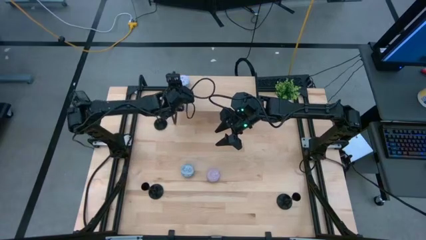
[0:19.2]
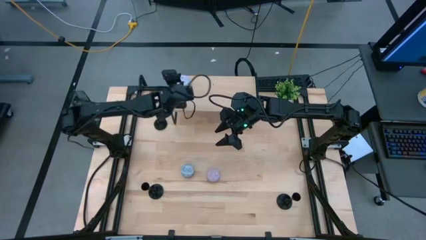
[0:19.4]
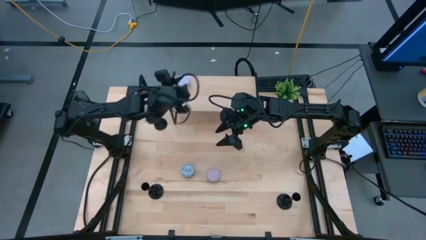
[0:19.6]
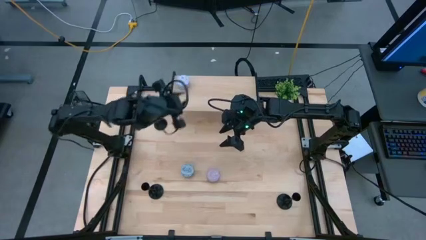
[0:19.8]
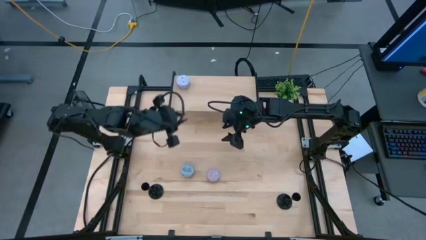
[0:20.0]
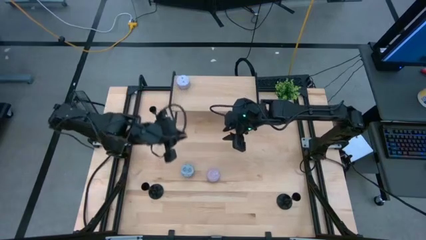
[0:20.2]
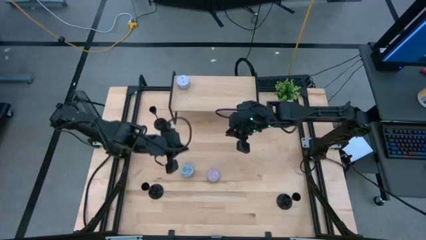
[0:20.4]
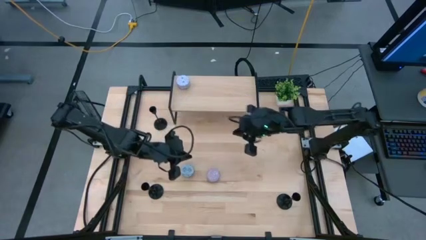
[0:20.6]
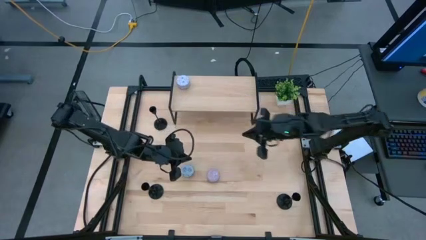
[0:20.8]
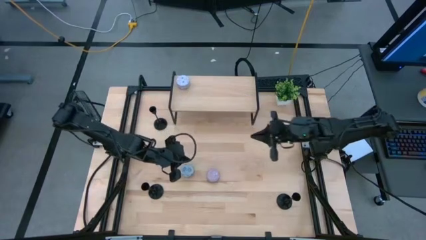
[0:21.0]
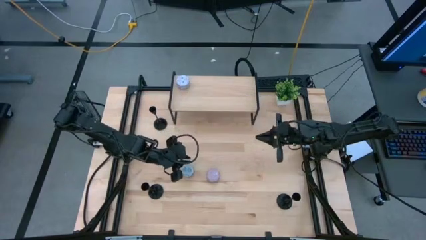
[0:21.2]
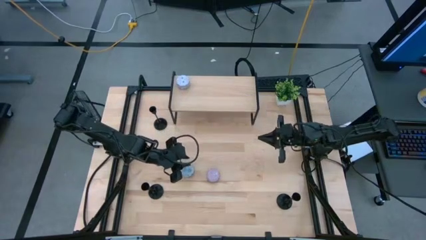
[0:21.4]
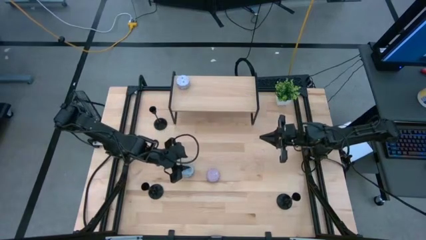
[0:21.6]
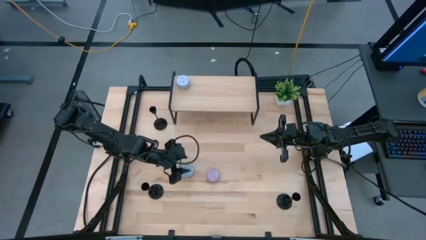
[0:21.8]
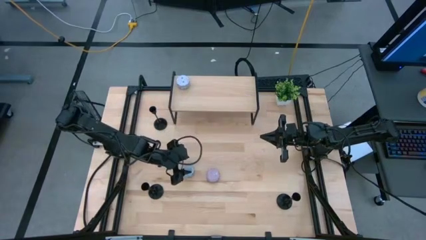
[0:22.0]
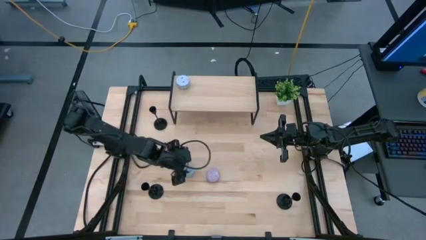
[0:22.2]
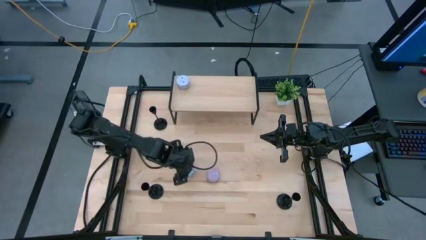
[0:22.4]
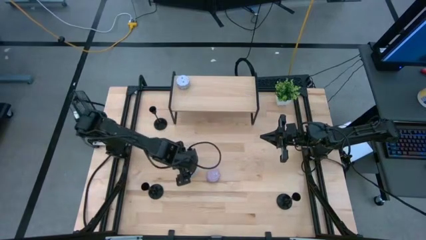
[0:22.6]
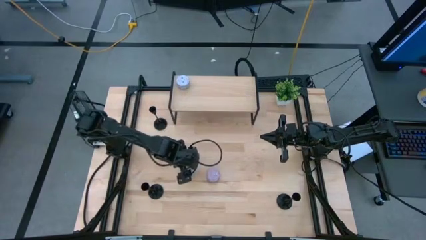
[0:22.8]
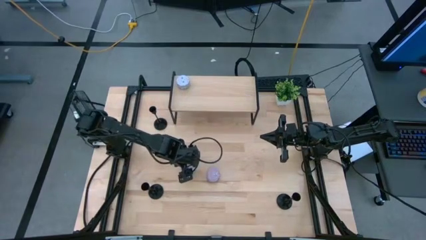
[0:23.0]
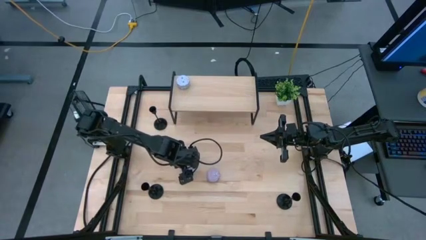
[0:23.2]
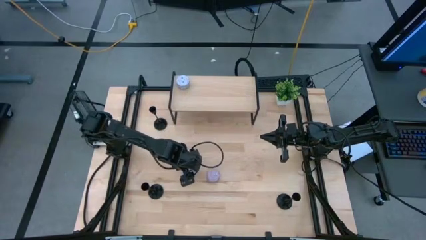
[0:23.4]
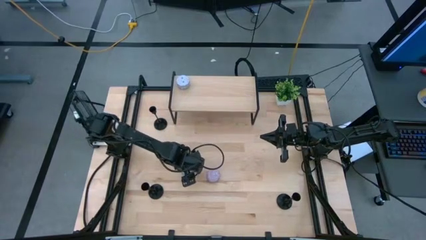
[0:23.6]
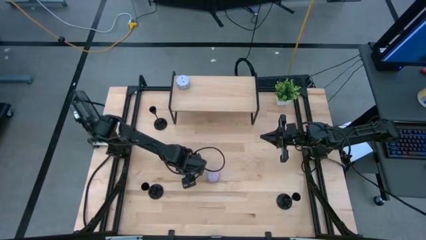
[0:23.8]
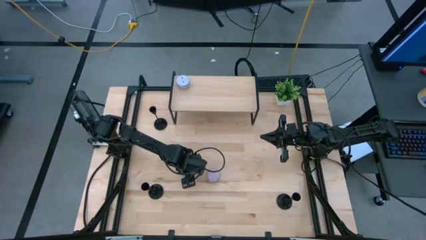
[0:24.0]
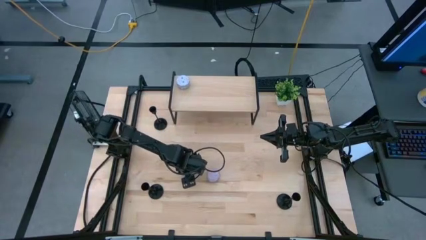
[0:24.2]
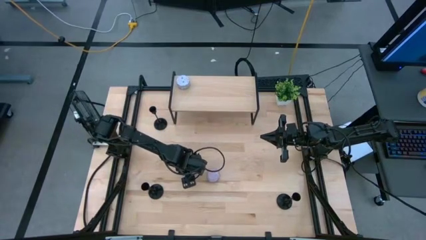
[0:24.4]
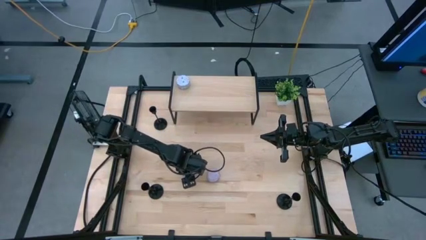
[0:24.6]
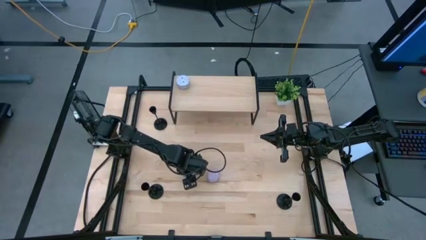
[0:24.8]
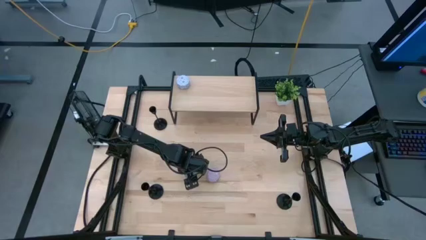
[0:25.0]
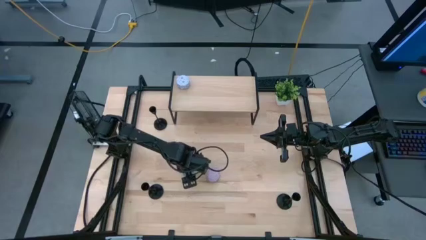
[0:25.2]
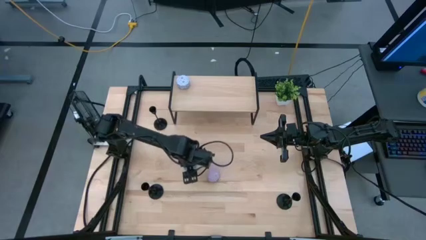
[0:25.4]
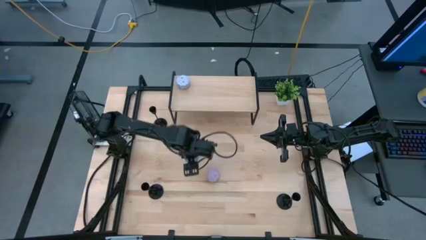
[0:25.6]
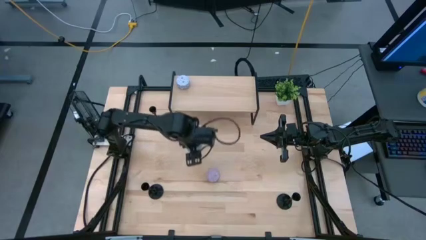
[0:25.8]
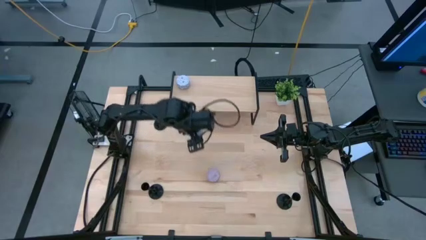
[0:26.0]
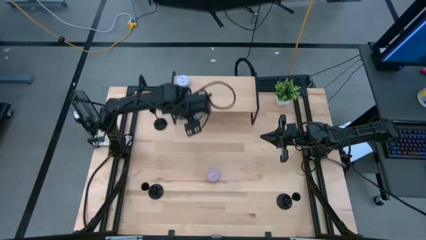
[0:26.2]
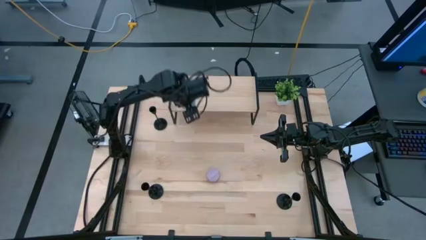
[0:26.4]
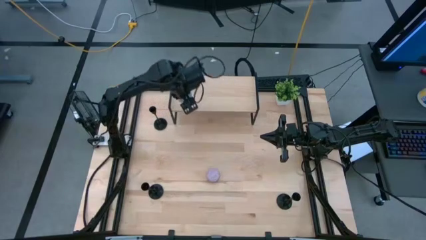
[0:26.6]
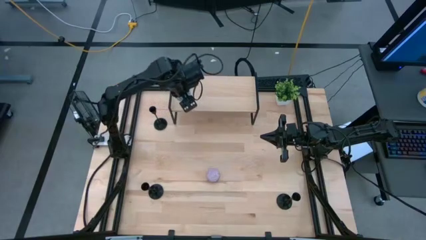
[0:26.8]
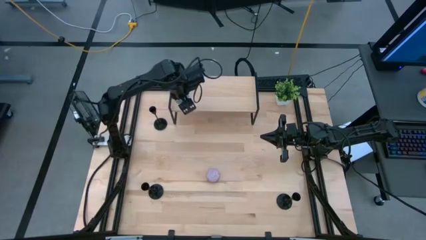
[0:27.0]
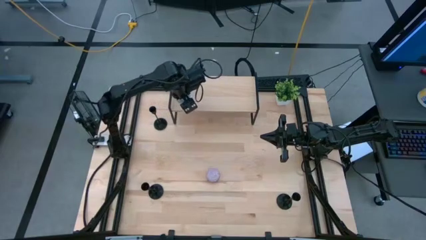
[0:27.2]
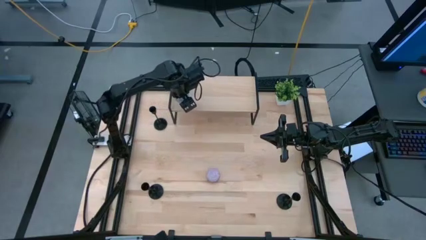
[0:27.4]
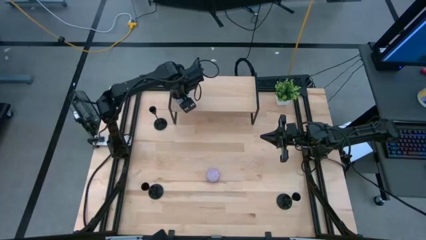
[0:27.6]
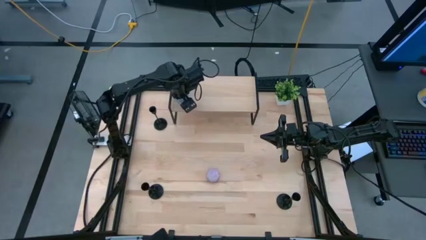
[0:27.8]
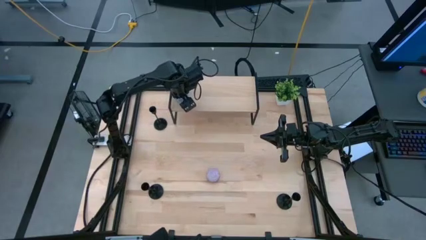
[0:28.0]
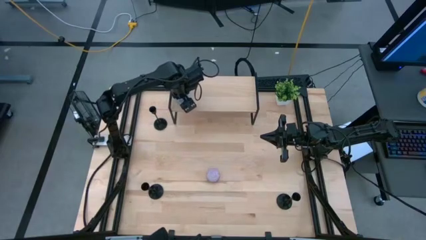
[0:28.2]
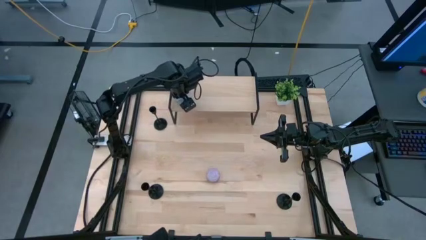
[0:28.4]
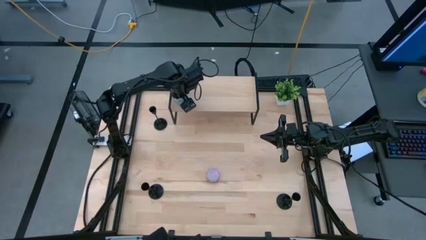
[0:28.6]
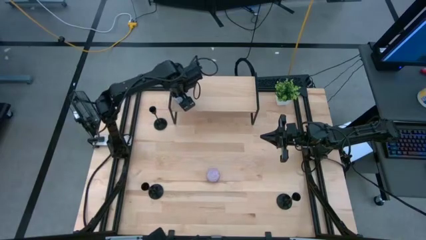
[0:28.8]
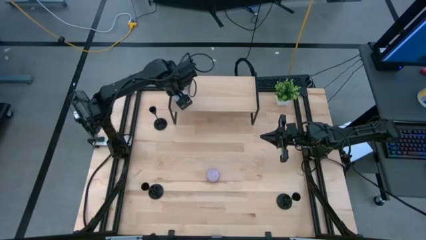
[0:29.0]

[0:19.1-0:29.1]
Task: Pick & Place candle stick holders
Put the blue scented candle on the shelf

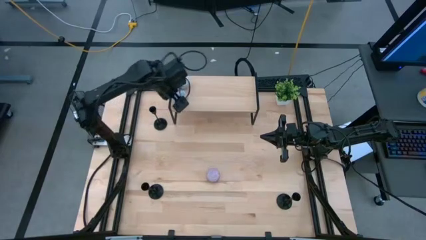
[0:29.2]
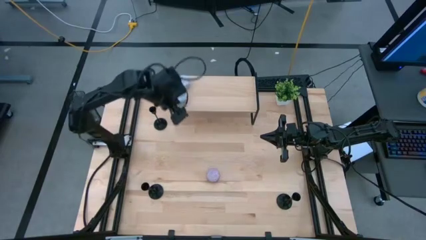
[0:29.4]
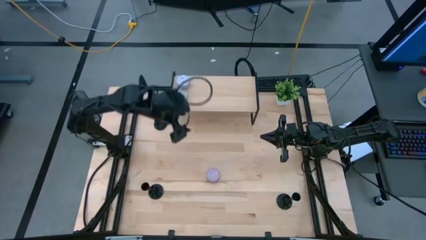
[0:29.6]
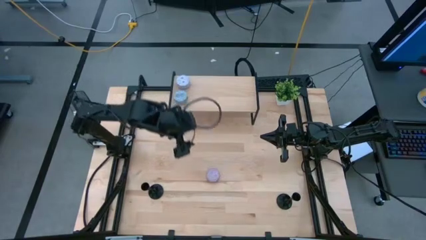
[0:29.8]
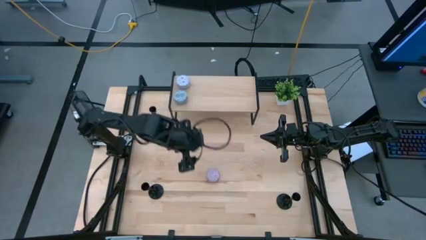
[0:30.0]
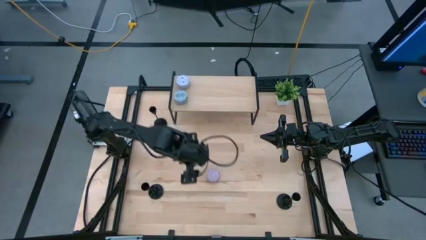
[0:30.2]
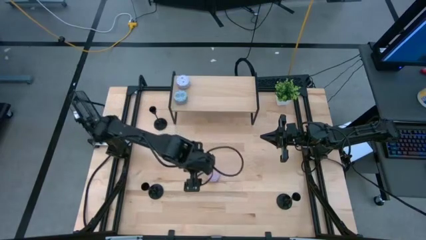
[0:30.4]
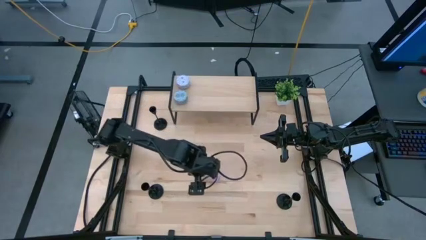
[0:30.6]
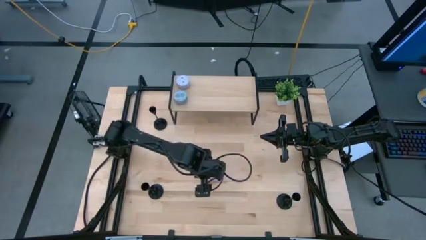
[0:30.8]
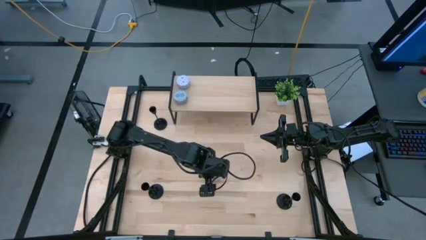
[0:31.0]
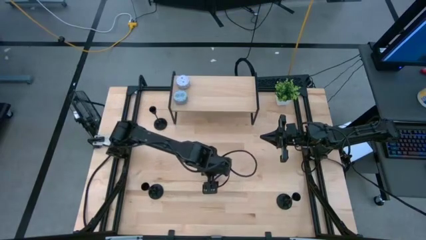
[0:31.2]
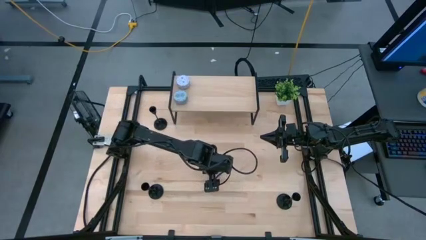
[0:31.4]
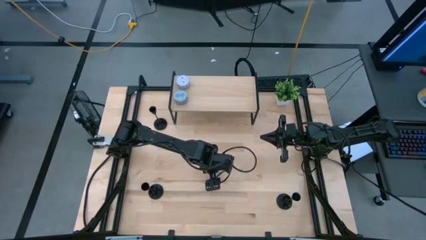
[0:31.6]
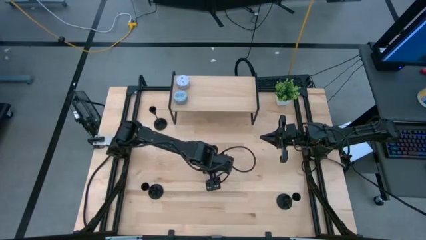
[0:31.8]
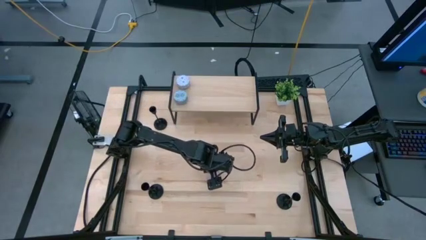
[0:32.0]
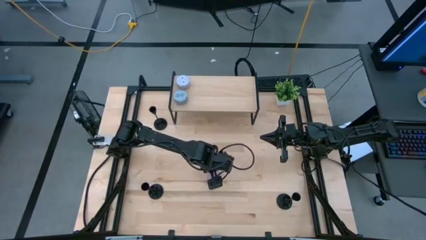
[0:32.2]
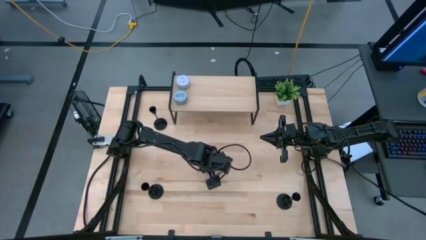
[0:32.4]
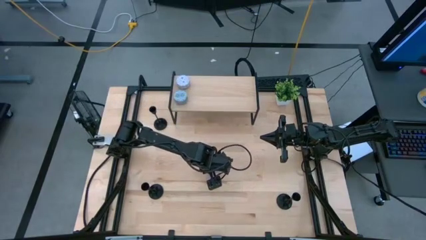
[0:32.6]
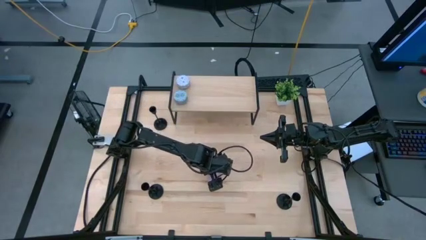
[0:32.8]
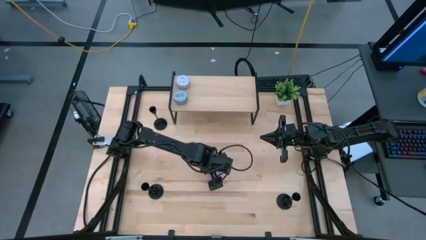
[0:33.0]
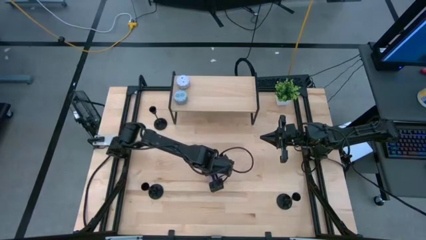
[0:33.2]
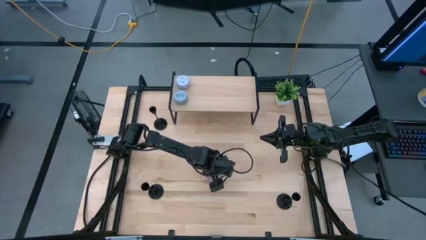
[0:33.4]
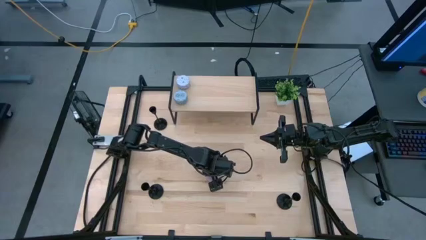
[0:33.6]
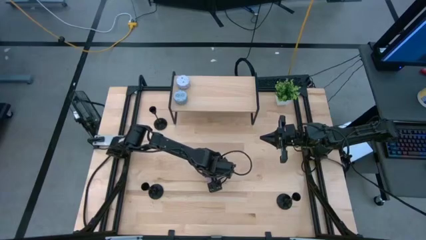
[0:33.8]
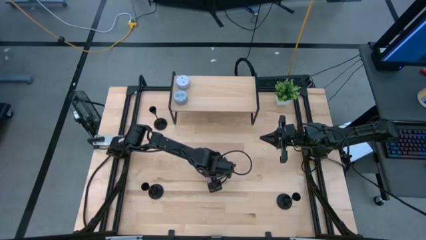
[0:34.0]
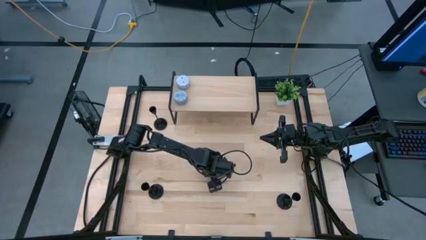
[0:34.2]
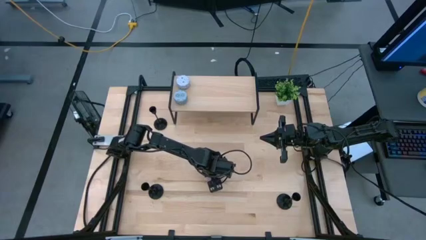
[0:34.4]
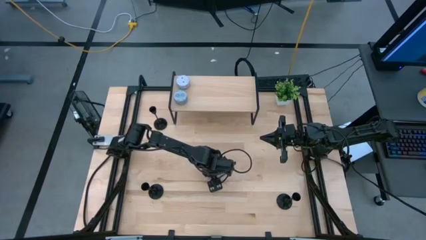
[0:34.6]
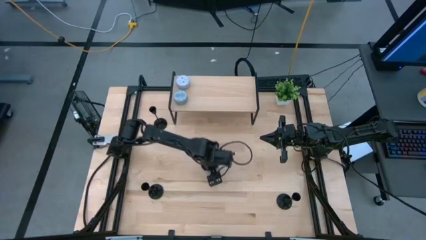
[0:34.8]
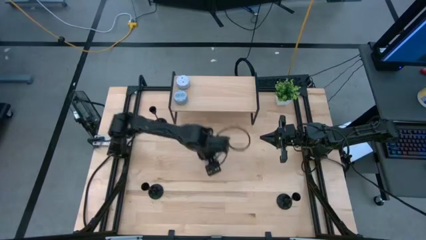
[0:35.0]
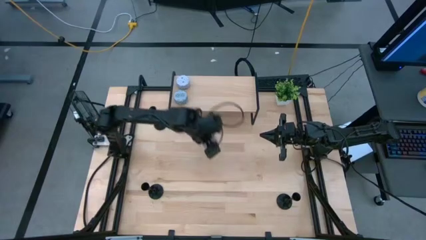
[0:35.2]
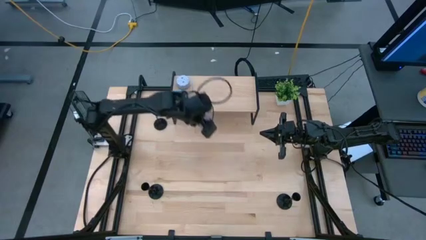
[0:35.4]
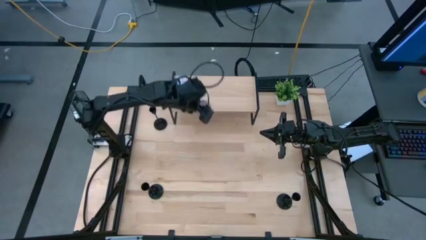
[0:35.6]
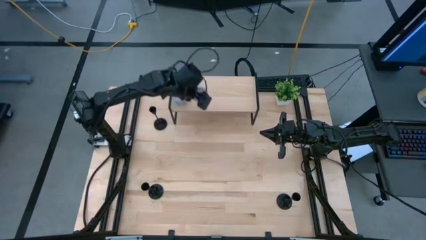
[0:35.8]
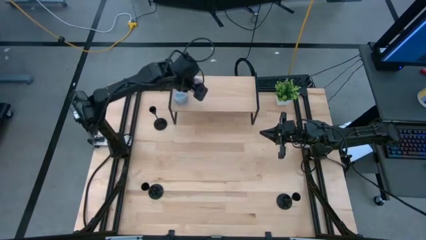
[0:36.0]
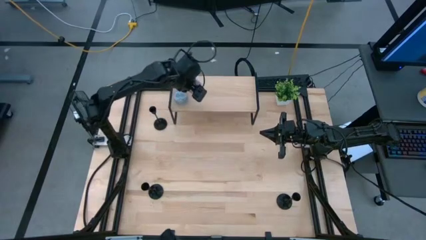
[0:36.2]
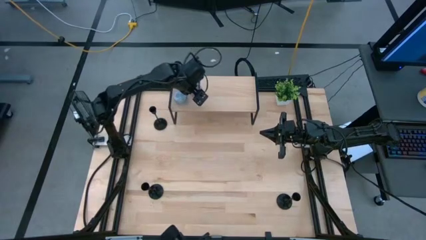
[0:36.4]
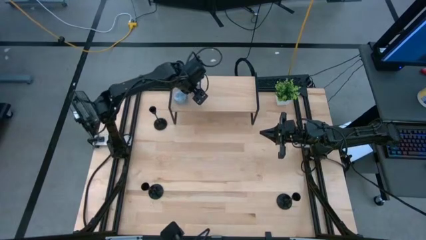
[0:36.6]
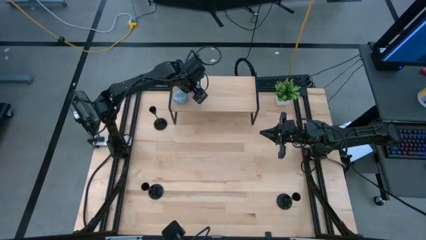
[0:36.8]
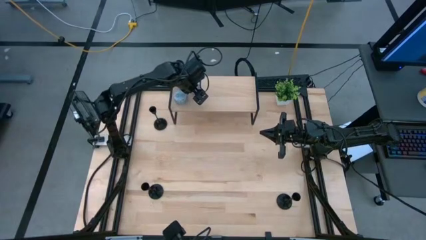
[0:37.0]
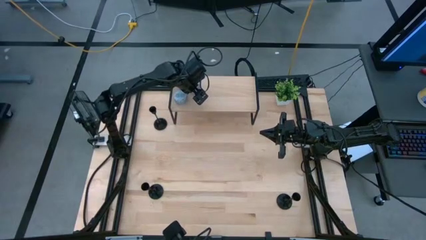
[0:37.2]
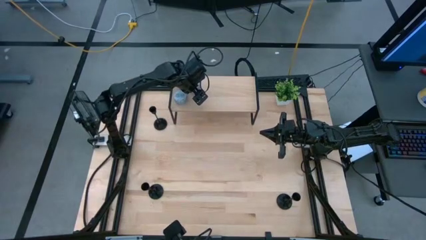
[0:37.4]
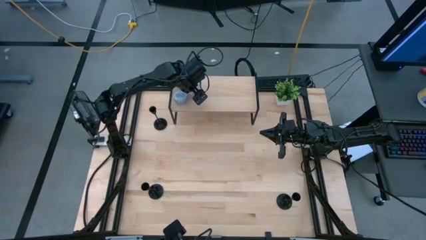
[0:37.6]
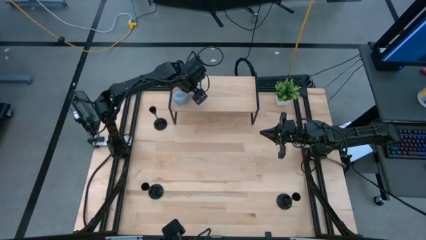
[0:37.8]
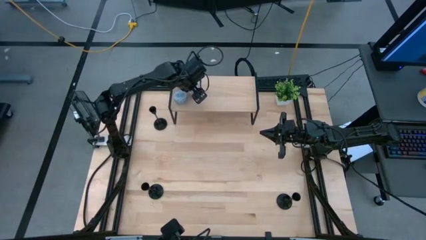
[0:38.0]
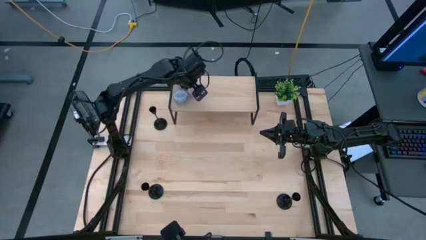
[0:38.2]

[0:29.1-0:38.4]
Put the pink scented candle on the shelf
